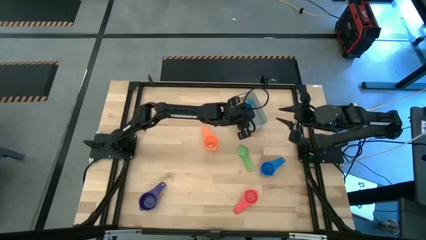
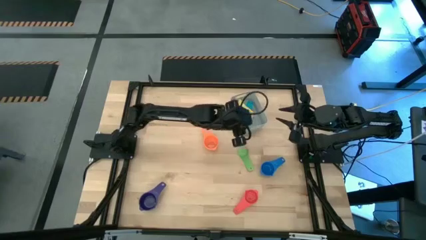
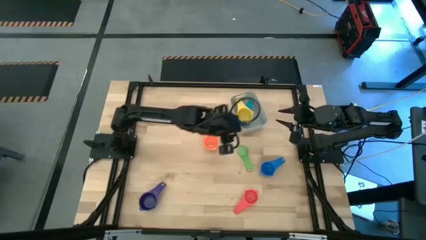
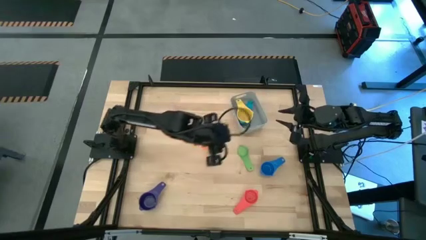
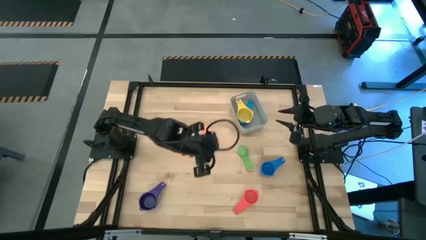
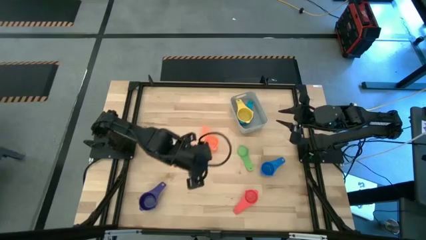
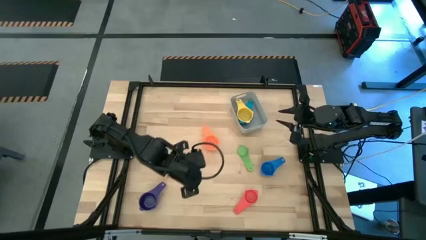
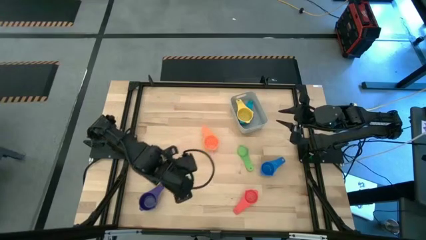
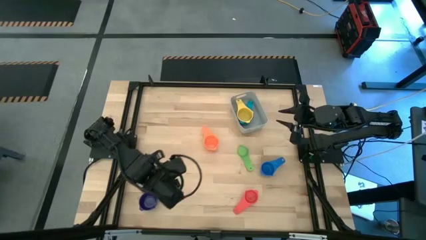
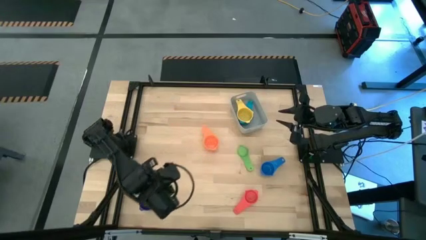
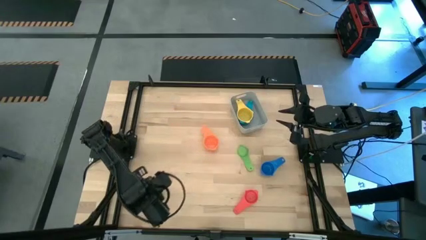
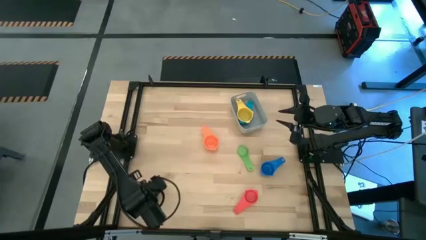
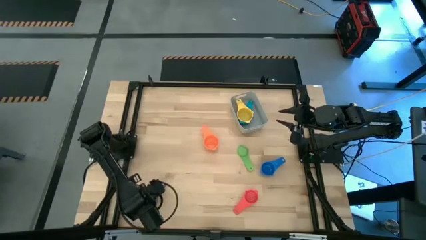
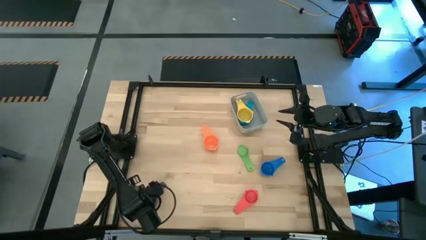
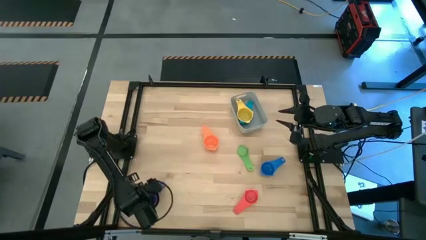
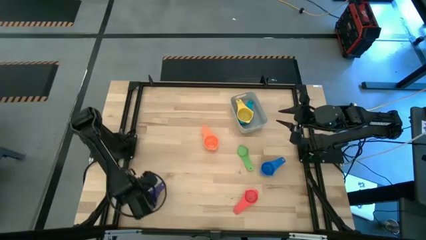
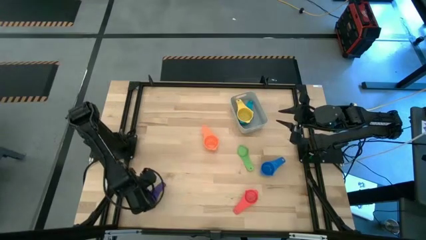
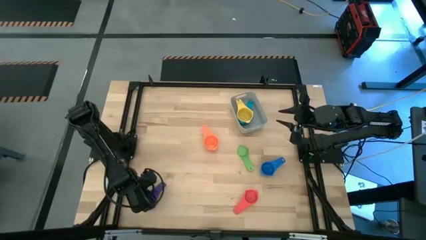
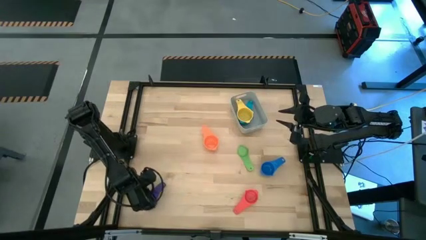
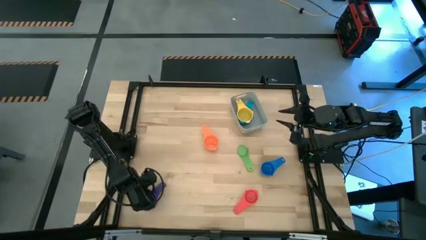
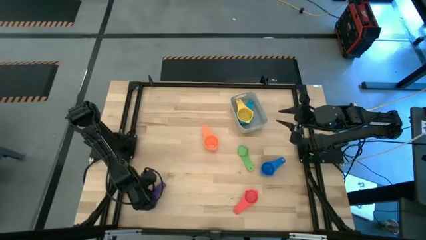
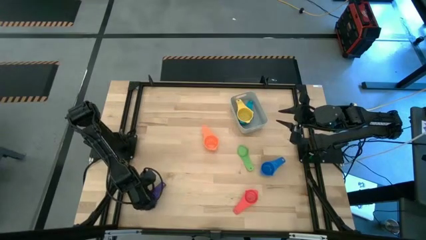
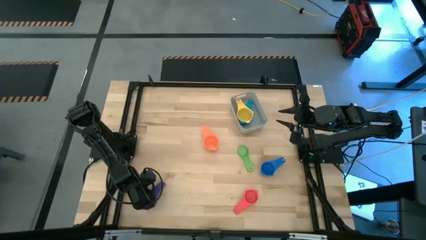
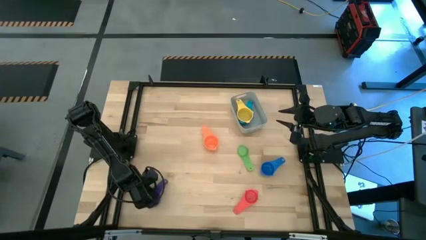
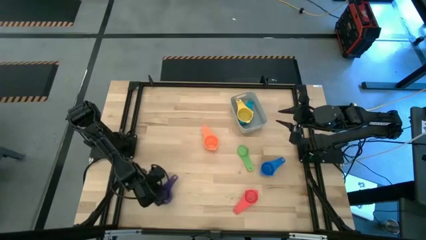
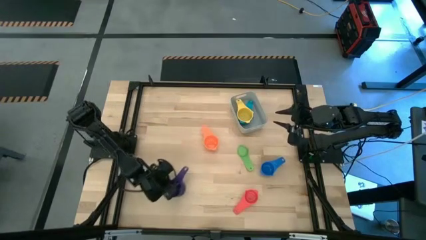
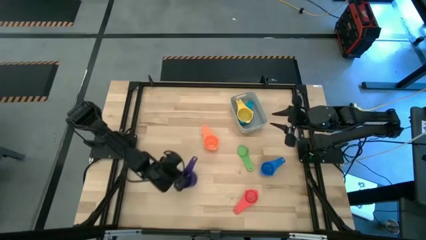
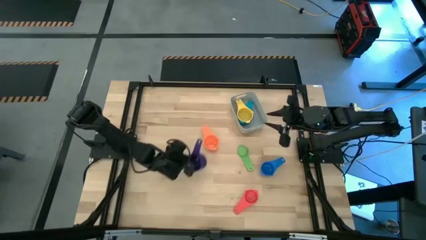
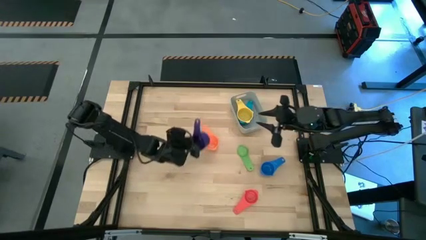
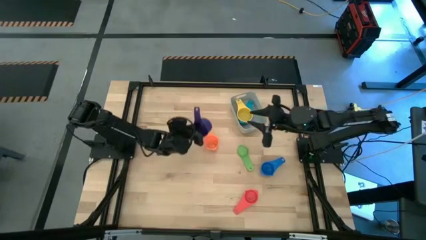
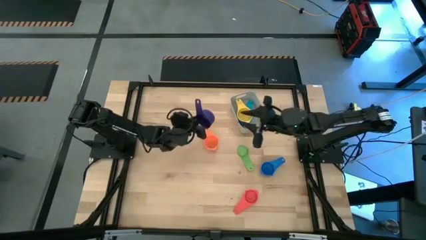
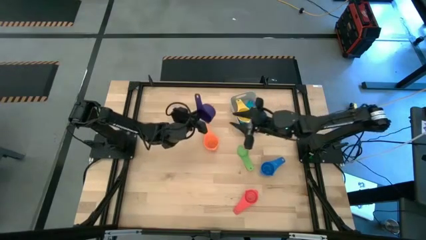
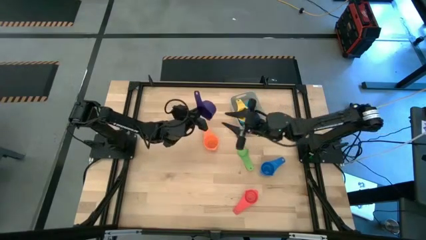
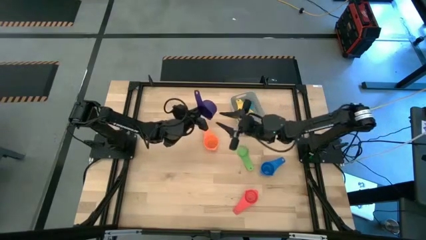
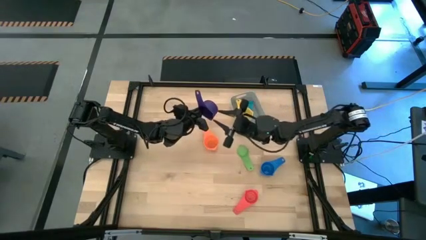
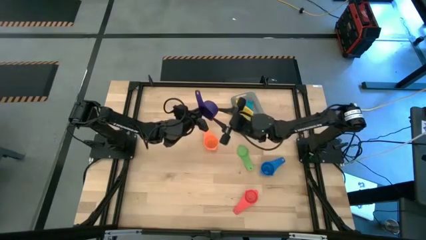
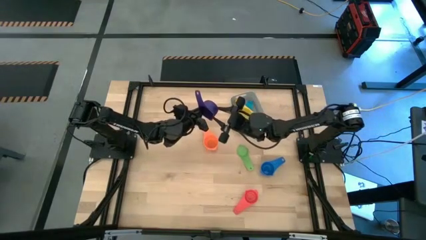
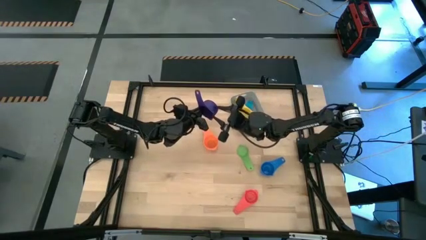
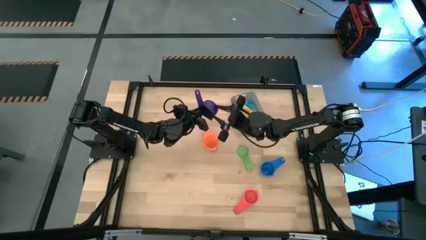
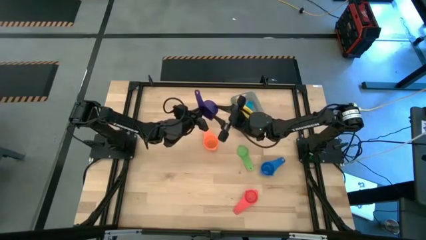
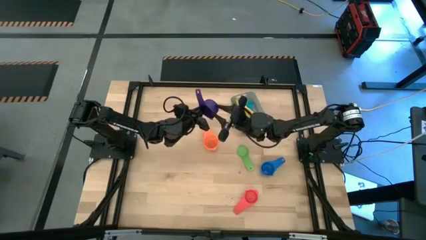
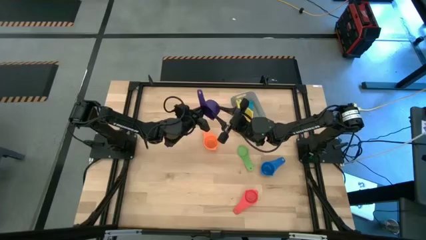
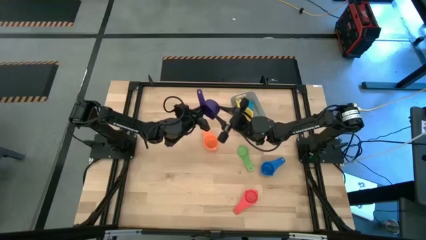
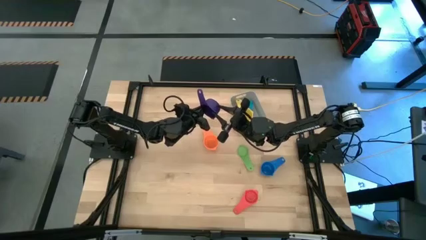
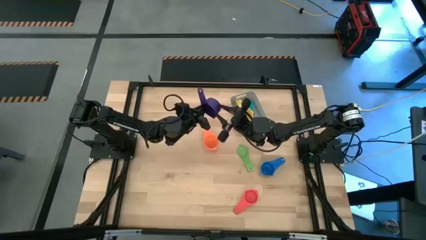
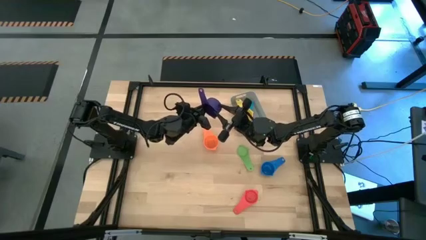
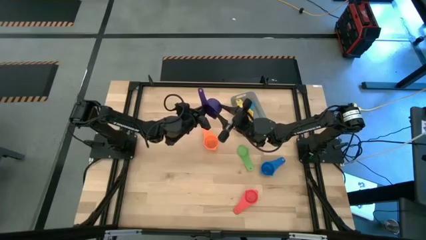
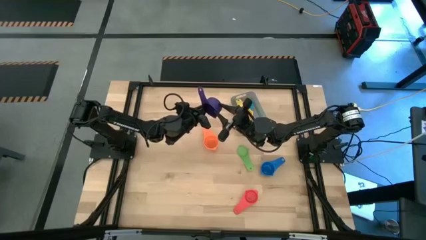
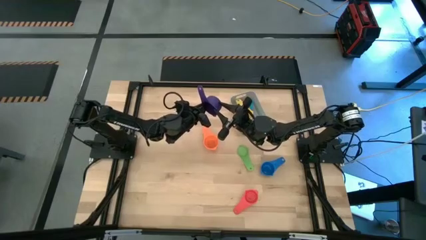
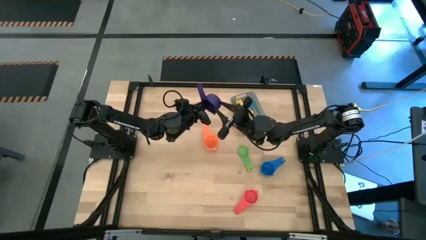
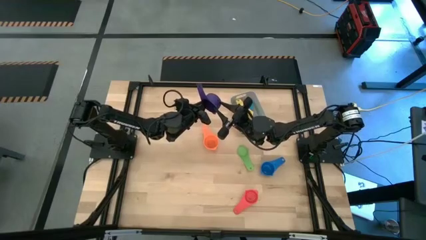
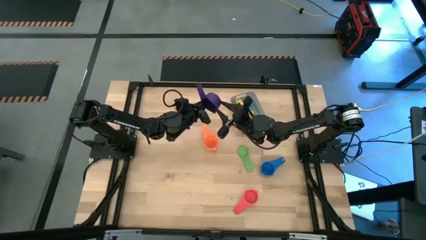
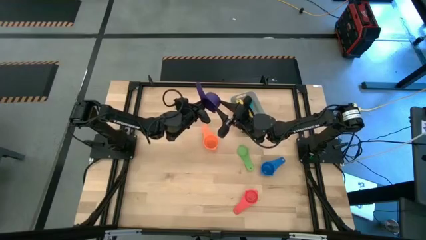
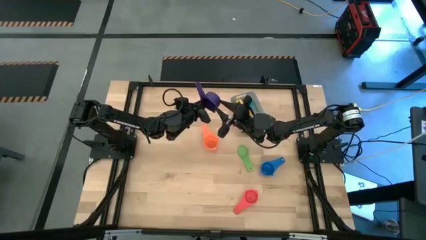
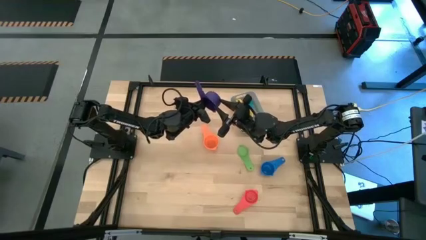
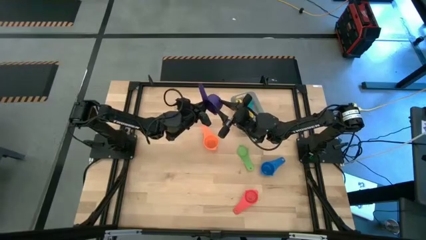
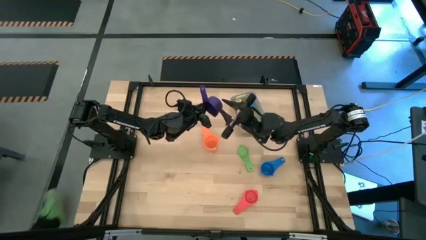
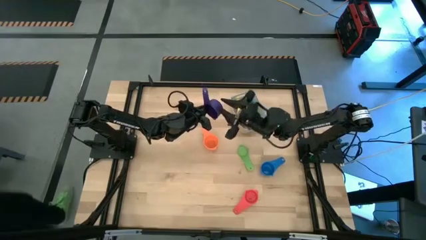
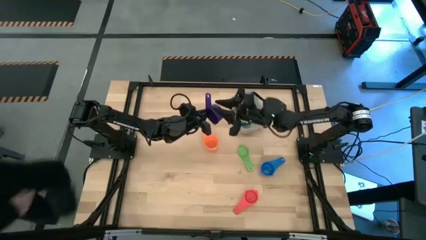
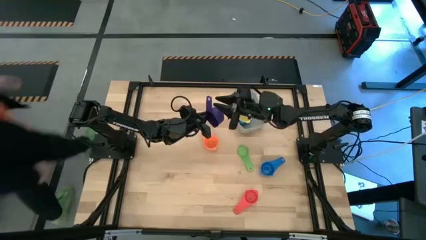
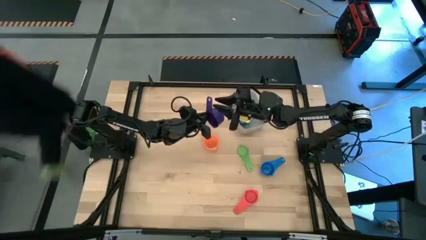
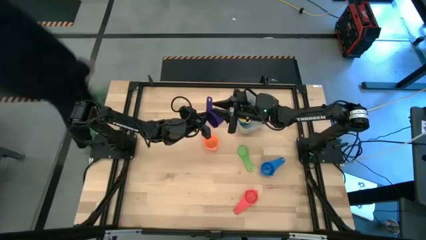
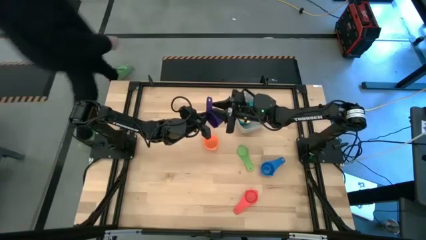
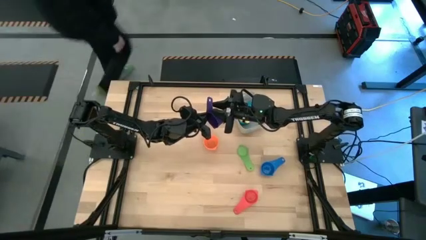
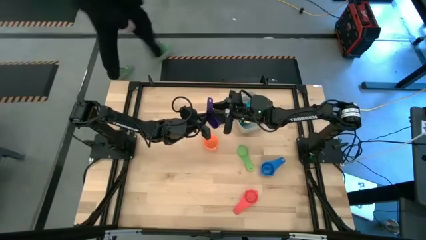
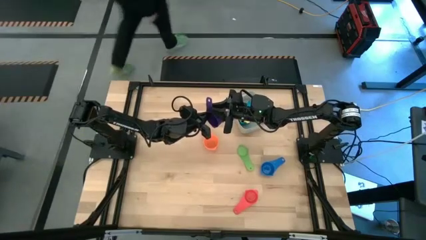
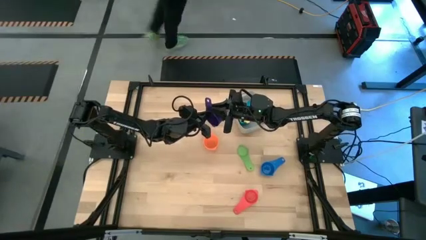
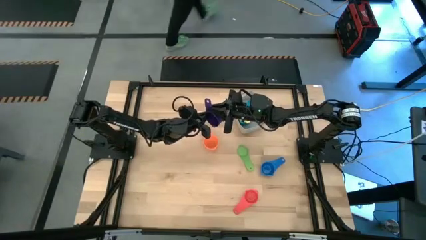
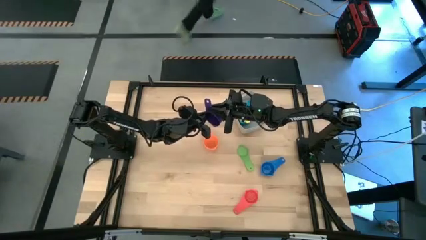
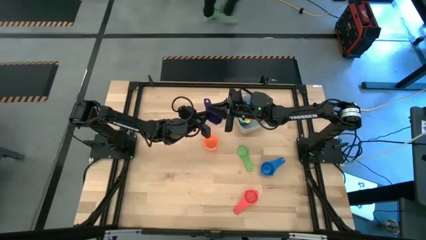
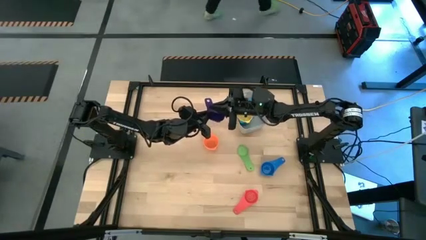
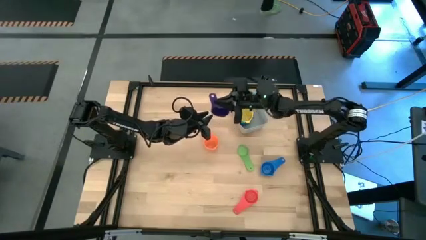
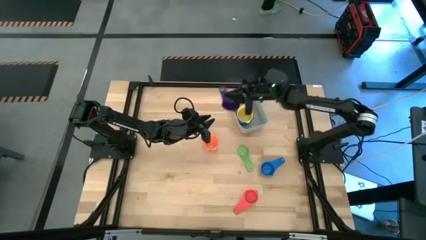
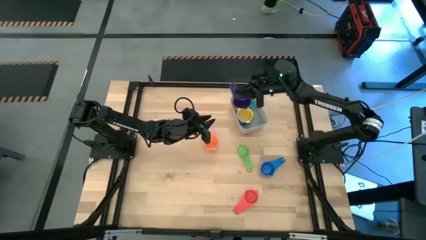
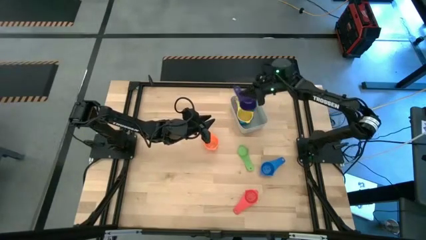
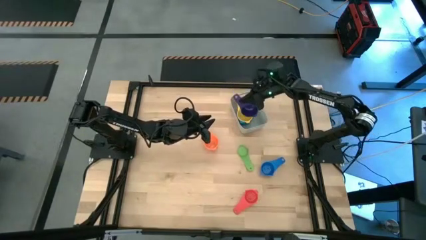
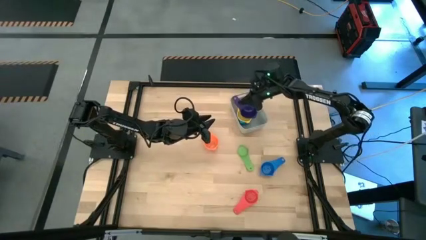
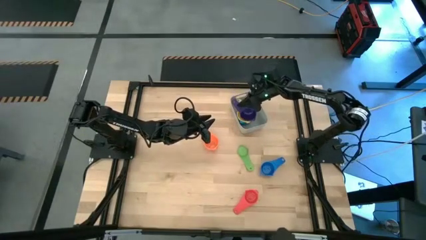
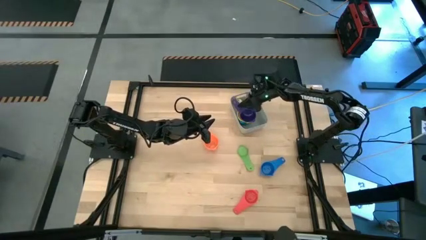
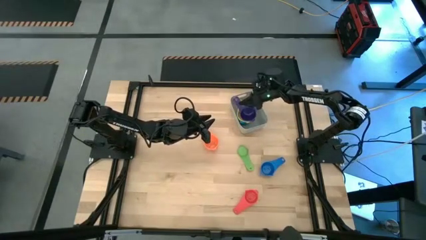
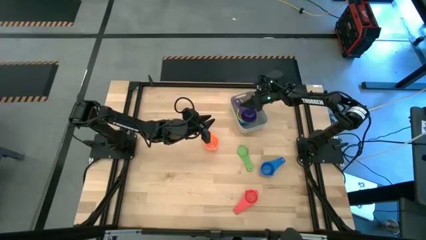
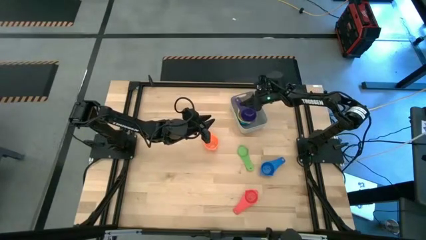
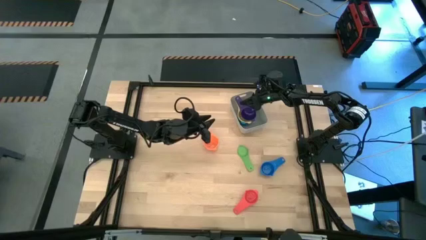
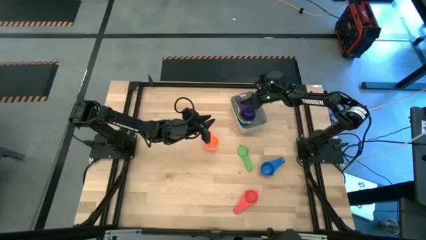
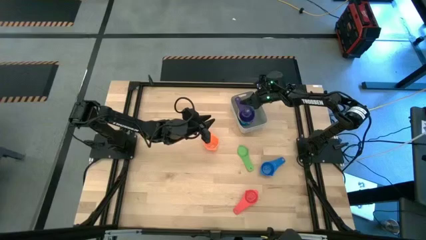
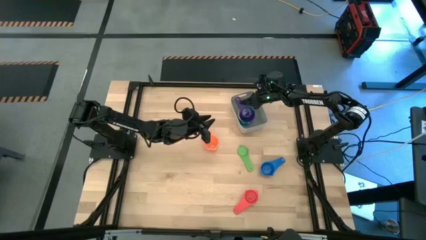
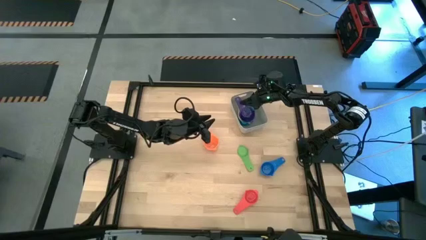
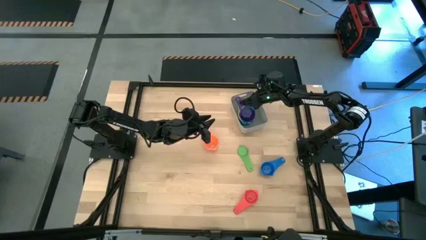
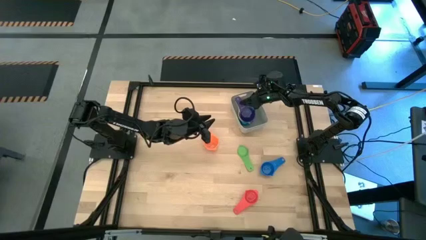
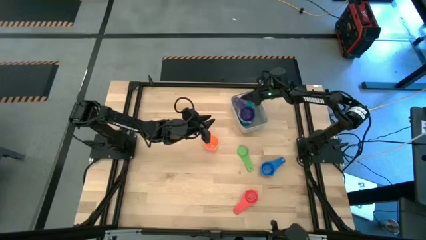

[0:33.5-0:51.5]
Task: Nest measuring cups in basket
Stack the violet measuring cup on top of the yellow measuring cup into the gray bin
